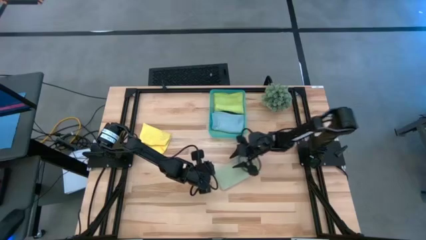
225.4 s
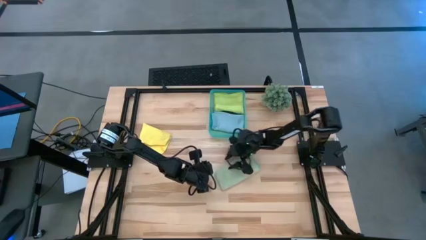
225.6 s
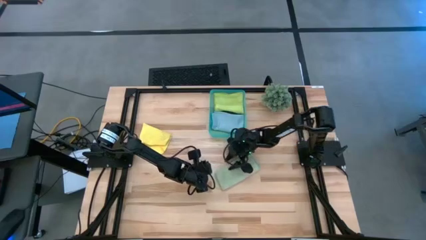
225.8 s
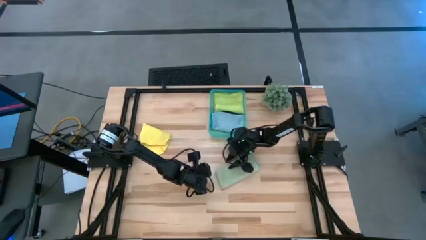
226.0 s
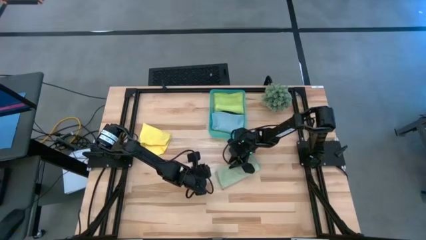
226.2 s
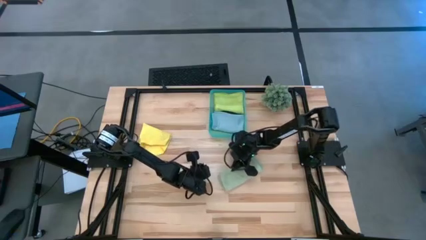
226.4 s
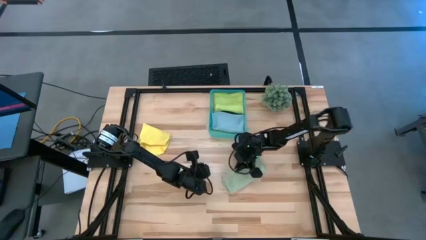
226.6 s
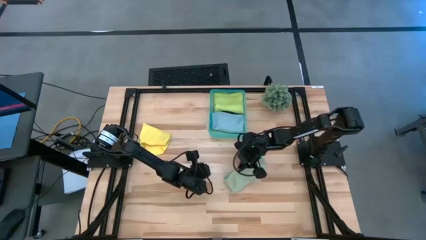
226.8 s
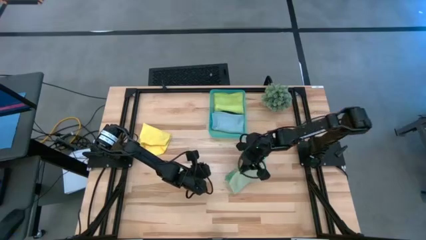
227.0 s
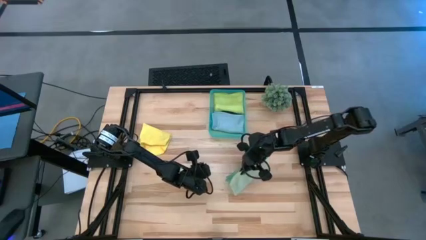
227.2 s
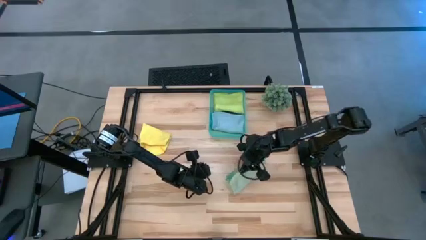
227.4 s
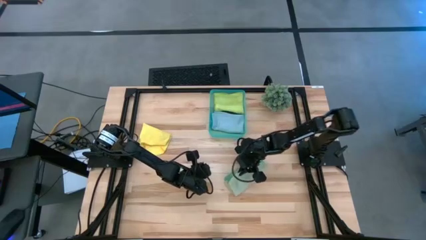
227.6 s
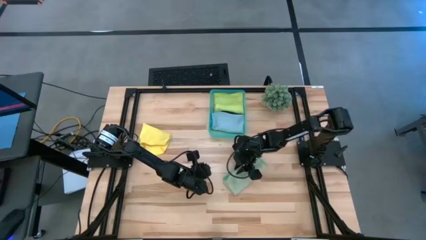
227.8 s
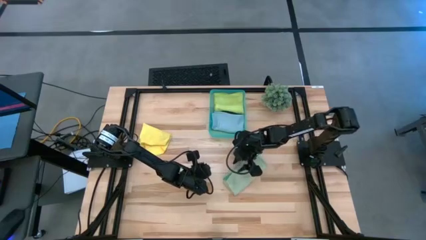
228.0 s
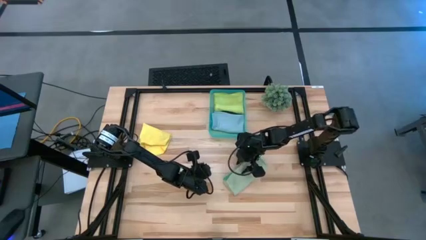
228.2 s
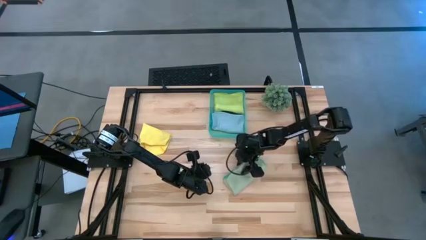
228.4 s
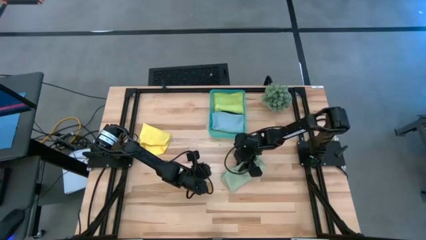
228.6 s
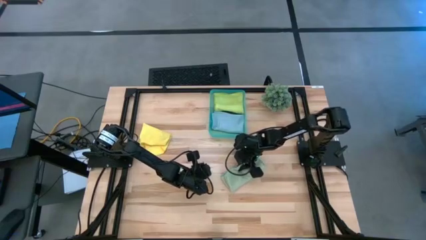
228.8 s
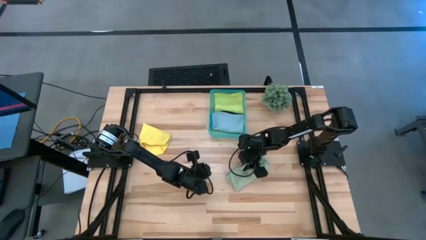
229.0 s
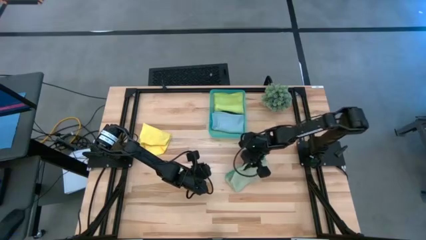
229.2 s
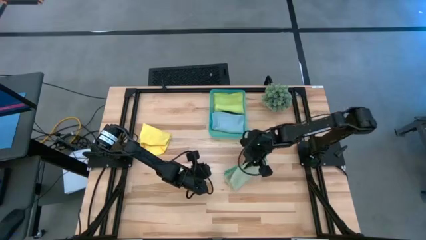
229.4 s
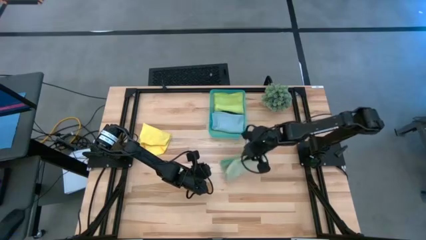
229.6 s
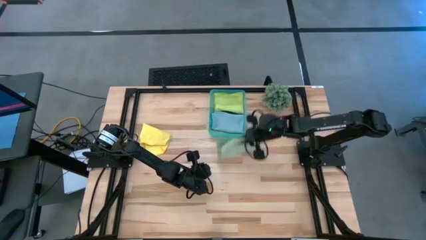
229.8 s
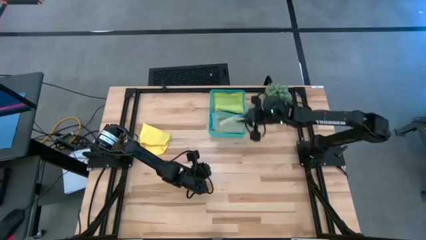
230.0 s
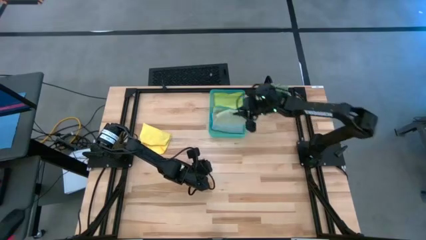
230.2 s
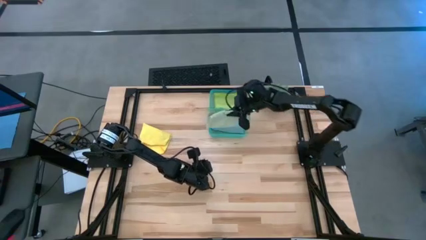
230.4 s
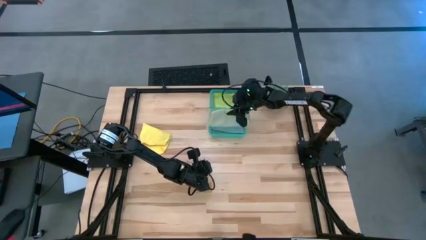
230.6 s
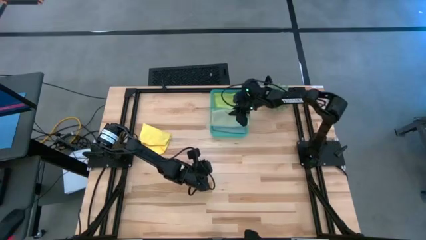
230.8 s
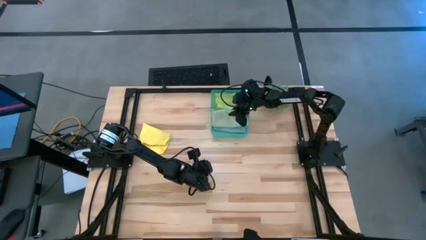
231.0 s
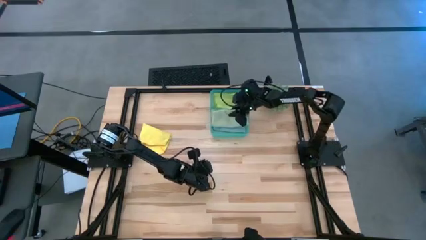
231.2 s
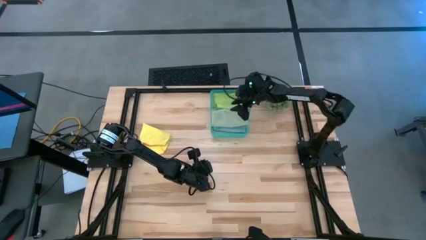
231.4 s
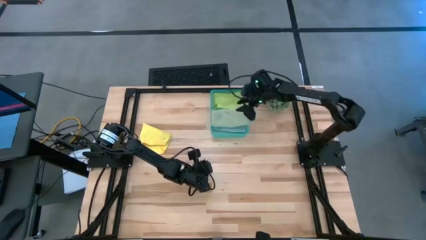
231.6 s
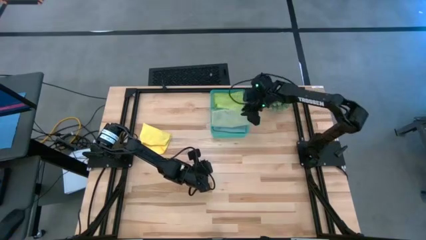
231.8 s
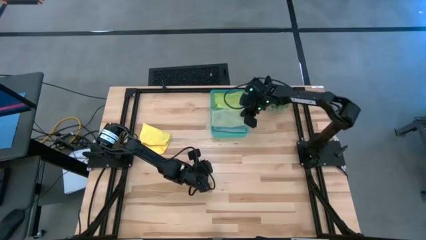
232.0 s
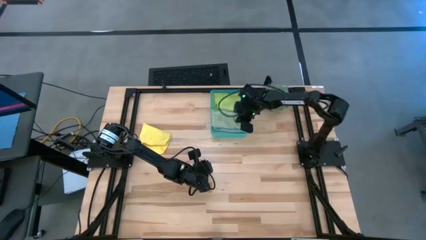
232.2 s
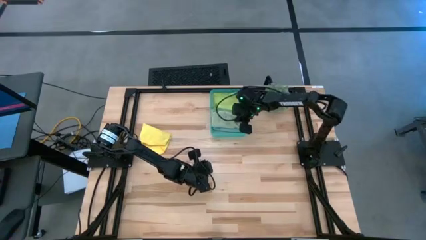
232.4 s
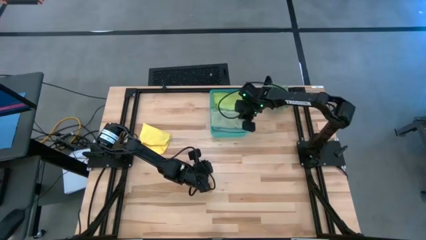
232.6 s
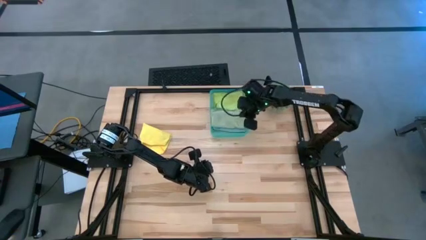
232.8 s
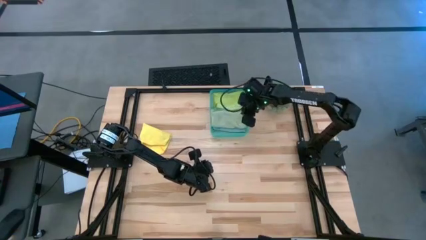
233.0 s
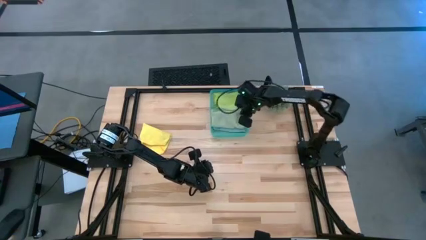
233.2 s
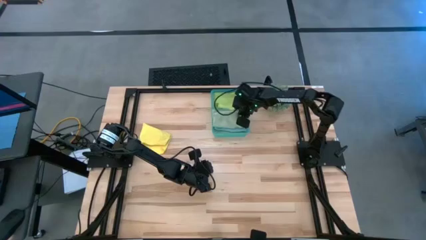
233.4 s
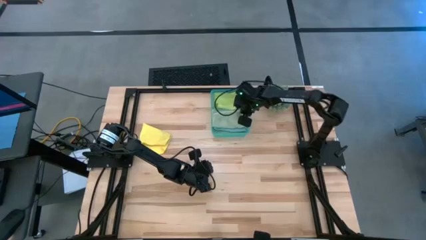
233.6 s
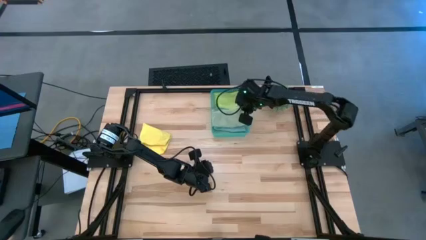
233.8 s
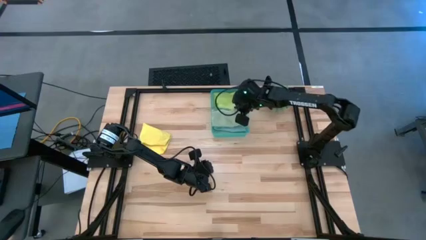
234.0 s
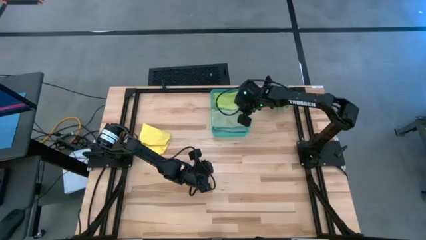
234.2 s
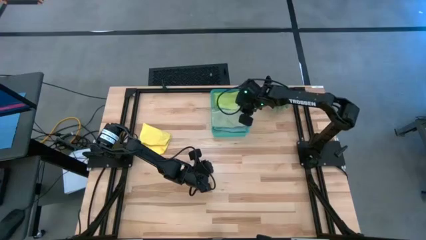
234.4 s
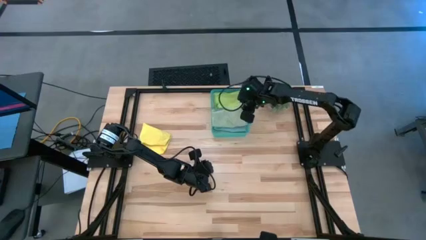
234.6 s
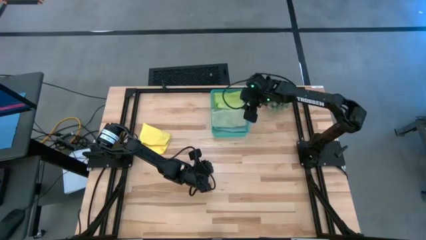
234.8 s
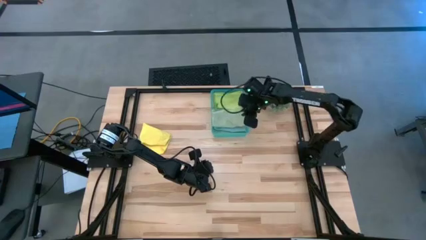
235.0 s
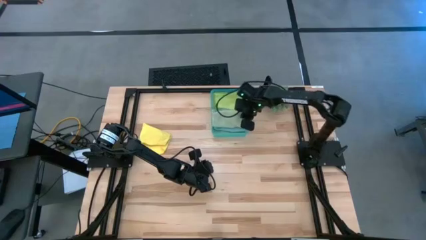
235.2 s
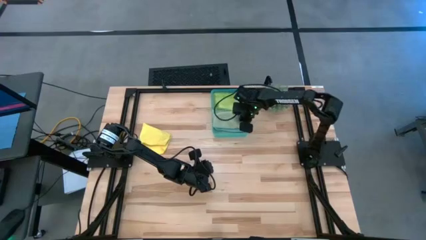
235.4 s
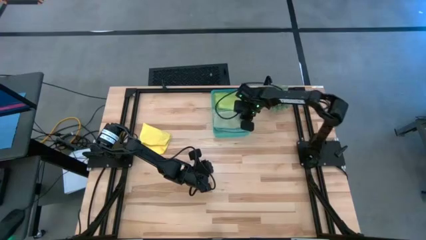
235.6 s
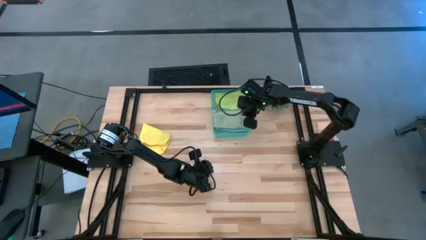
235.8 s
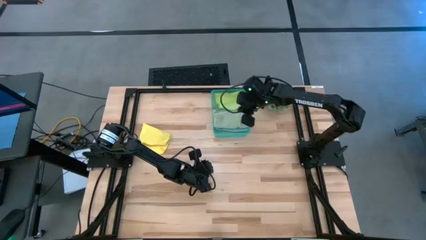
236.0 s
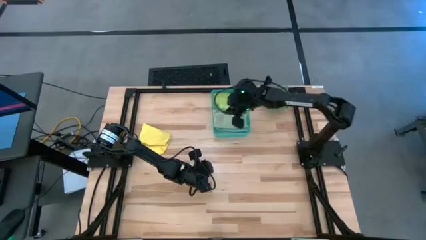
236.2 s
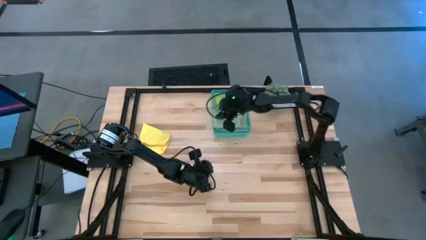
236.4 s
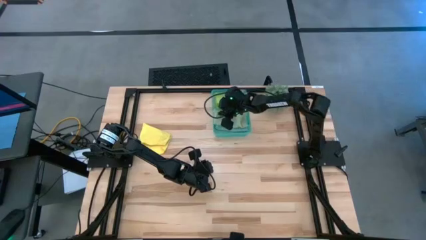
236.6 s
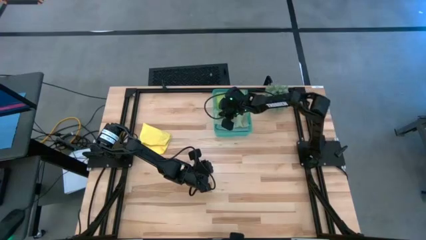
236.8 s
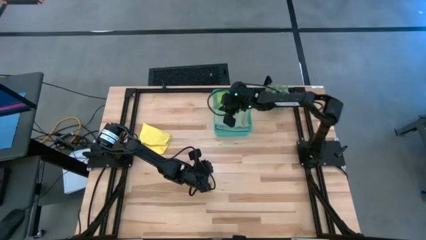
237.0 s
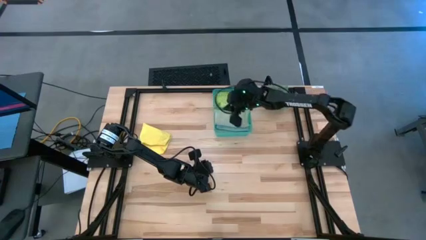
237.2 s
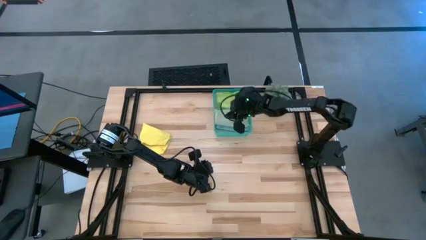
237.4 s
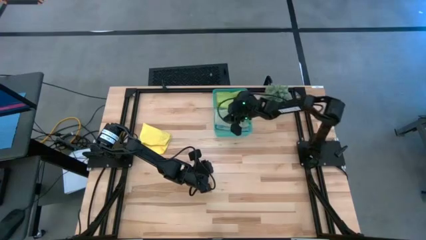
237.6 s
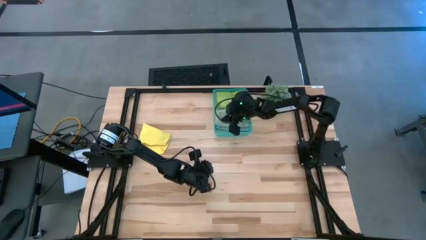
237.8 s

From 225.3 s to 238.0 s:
Task: Fold microfiber towels
Put the green microfiber into the green bin

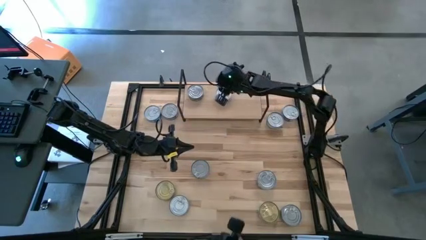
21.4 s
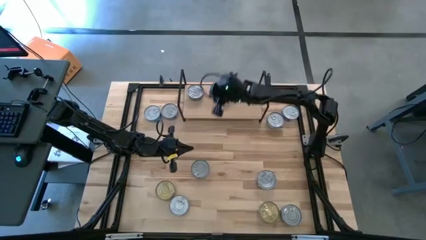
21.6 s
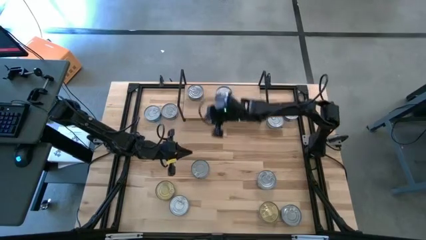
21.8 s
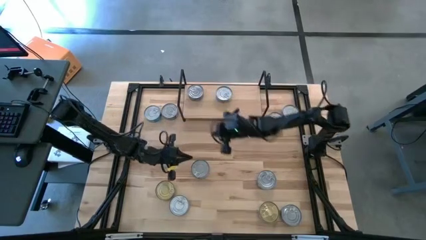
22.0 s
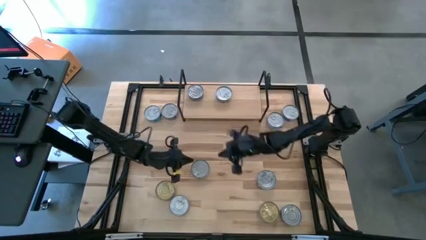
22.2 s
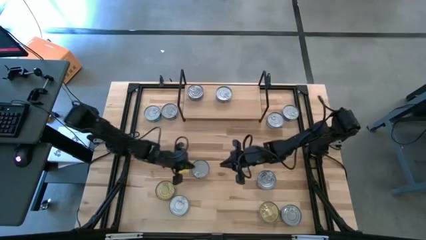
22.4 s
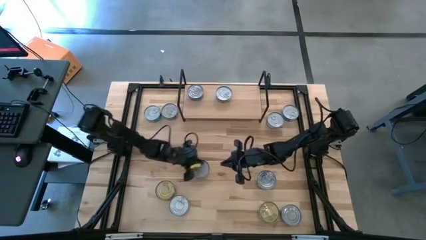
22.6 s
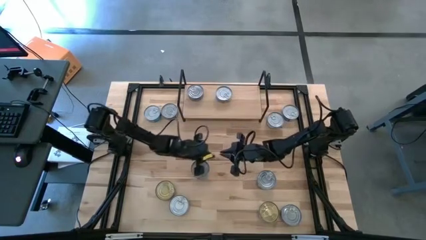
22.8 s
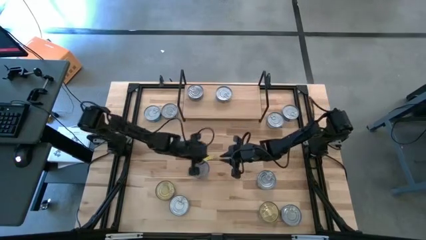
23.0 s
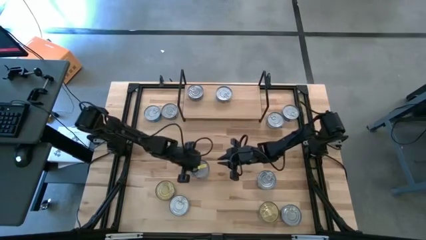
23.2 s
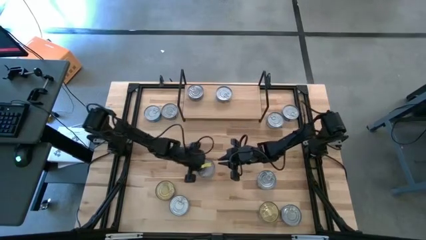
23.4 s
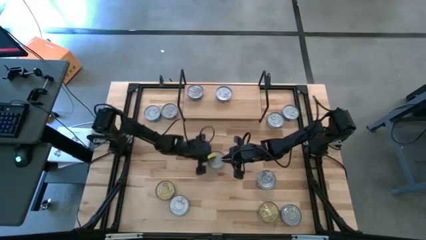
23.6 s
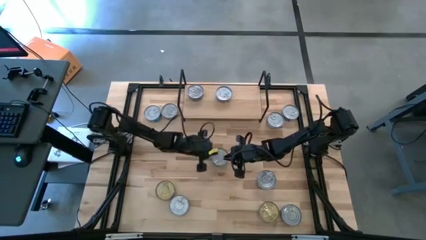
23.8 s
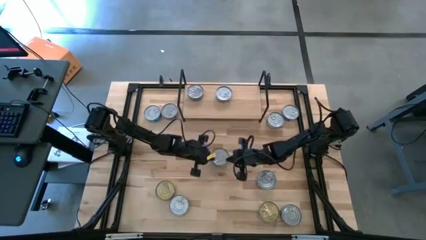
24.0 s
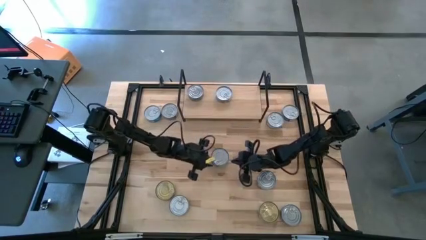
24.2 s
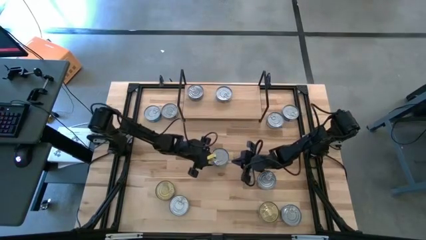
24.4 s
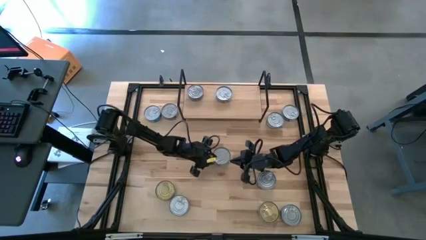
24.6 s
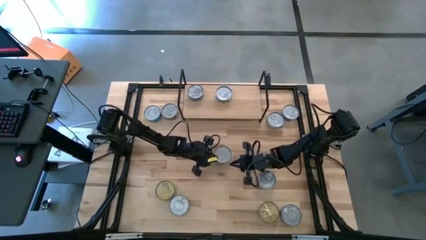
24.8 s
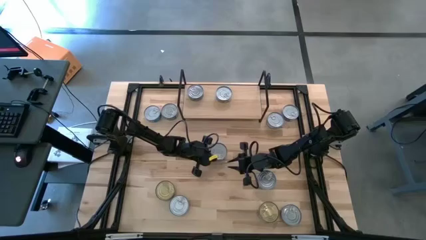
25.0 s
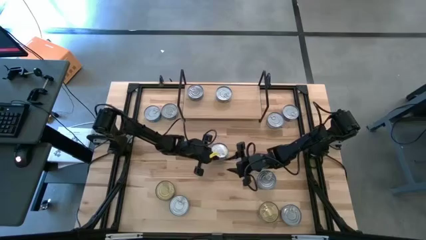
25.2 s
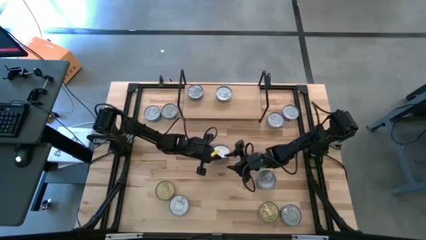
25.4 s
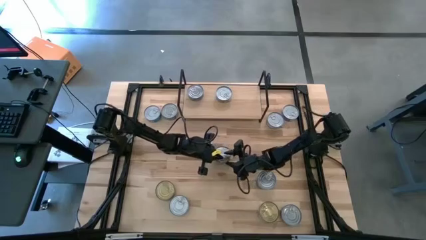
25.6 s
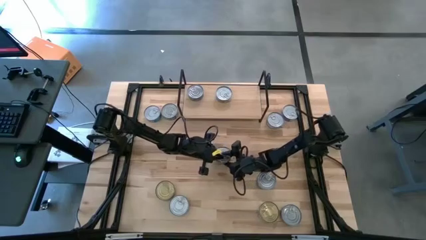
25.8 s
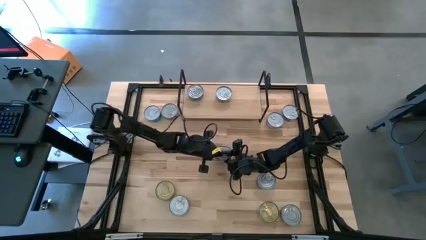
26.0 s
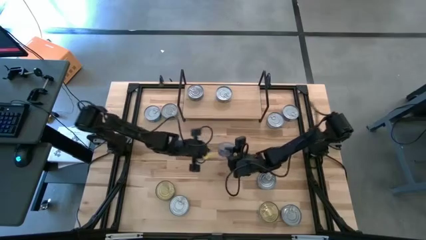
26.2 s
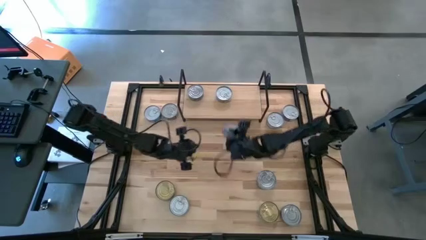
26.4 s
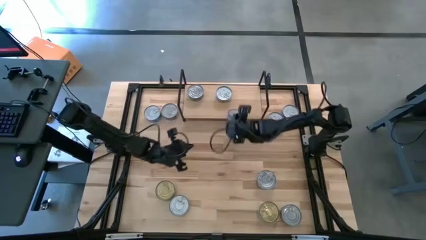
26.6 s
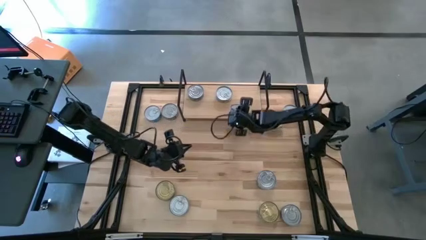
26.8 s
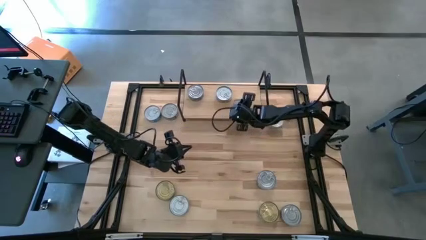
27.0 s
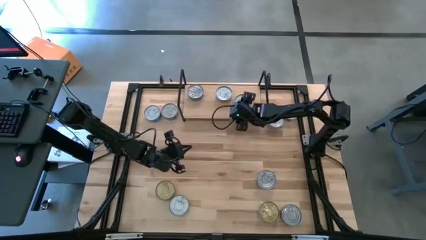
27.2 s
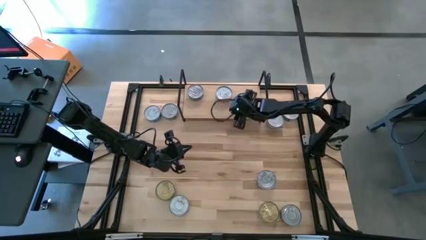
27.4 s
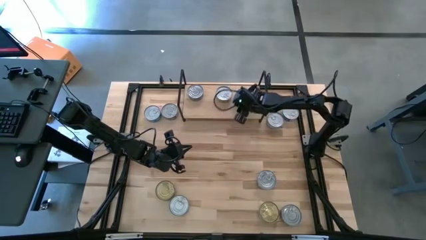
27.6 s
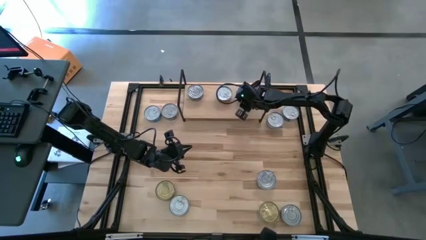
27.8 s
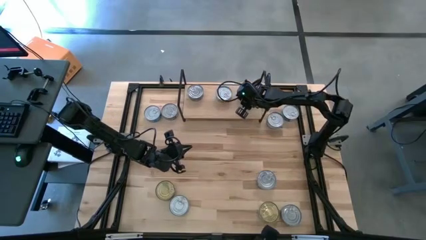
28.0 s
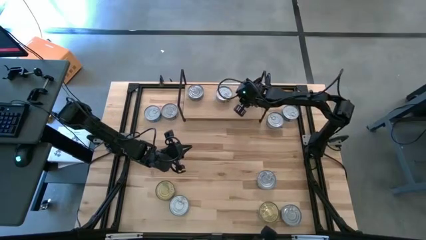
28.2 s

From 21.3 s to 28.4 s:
Task: Stack canned seafood by type on shelf
Put the blue tuna can on the shelf
